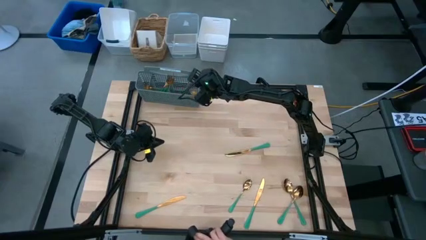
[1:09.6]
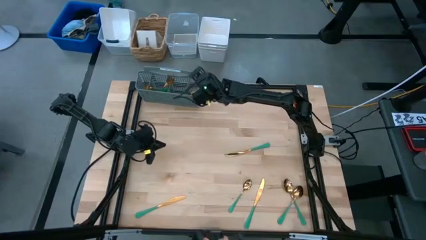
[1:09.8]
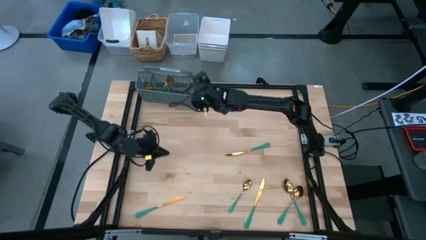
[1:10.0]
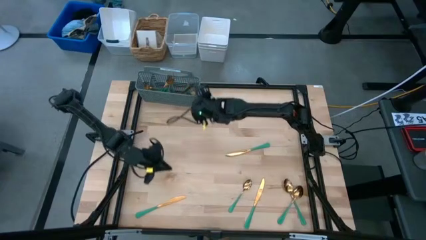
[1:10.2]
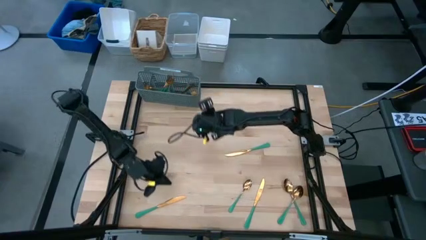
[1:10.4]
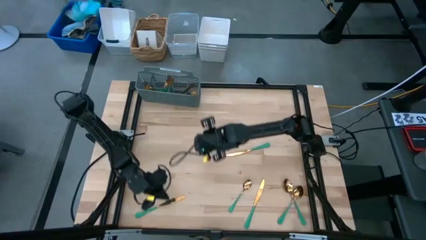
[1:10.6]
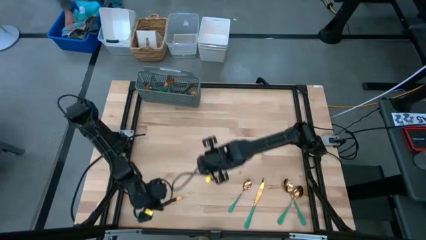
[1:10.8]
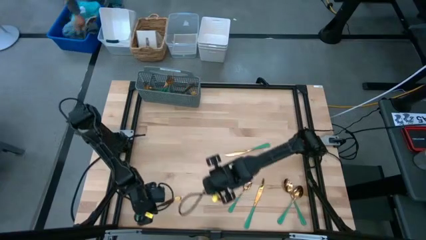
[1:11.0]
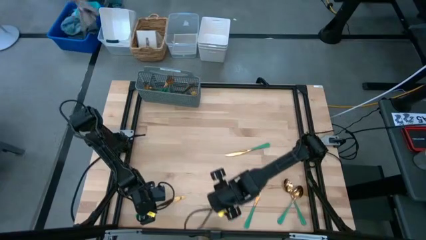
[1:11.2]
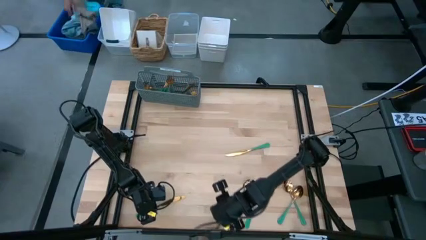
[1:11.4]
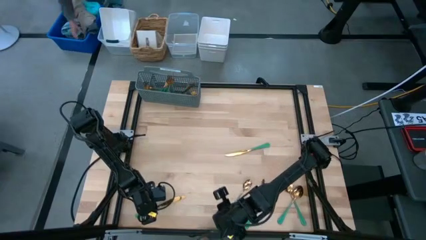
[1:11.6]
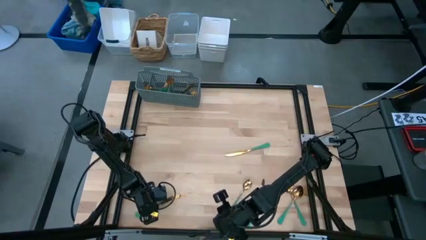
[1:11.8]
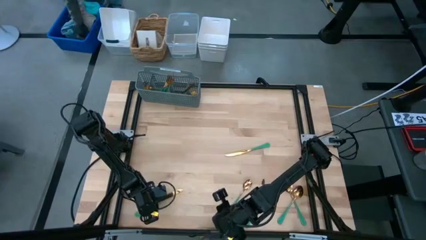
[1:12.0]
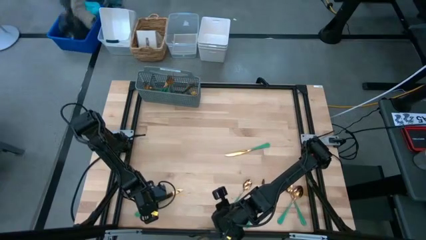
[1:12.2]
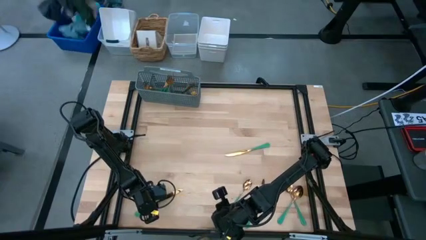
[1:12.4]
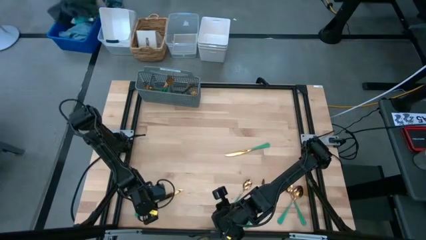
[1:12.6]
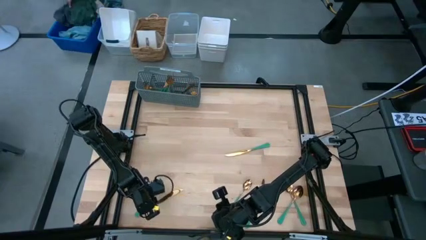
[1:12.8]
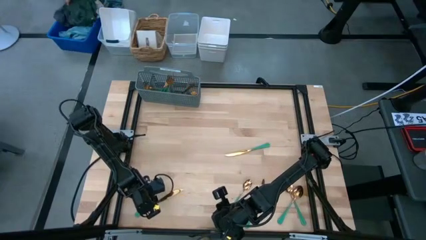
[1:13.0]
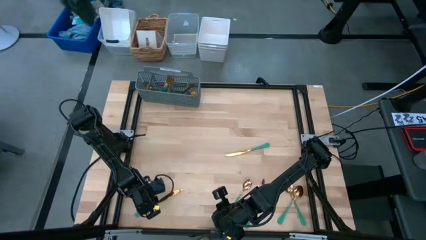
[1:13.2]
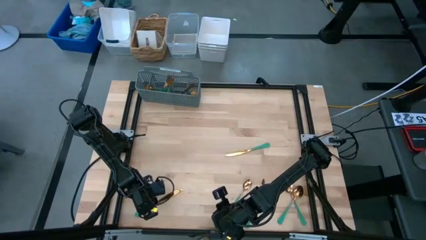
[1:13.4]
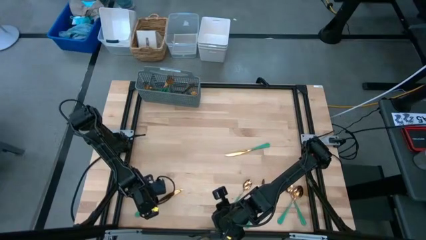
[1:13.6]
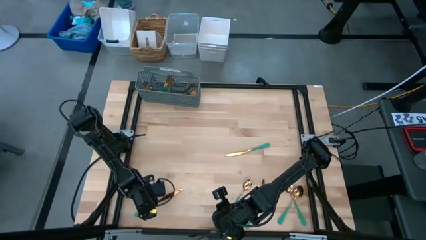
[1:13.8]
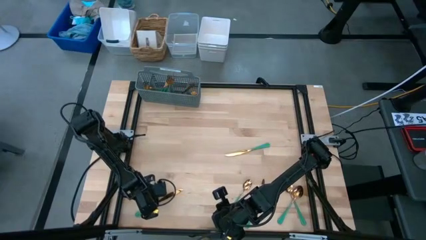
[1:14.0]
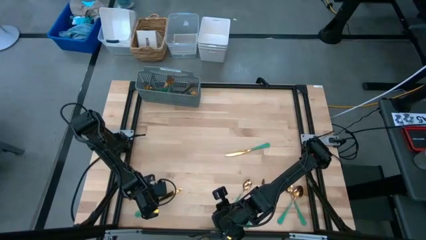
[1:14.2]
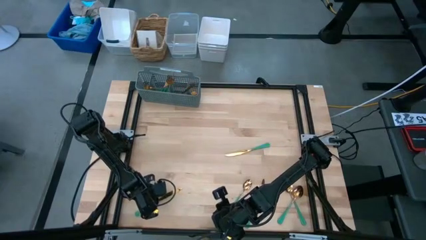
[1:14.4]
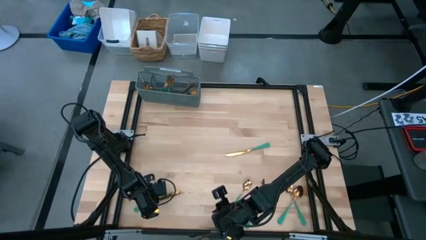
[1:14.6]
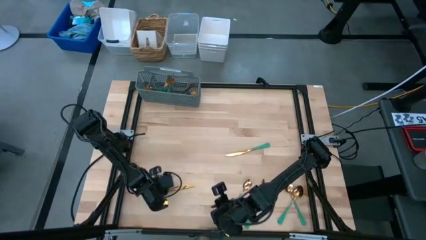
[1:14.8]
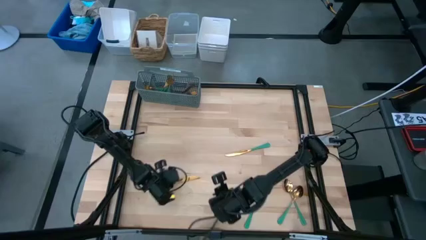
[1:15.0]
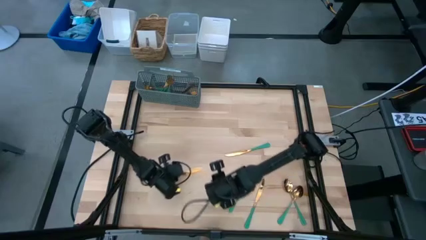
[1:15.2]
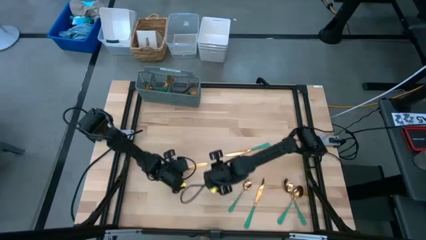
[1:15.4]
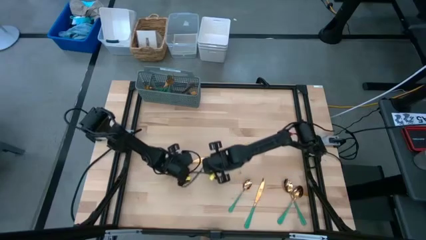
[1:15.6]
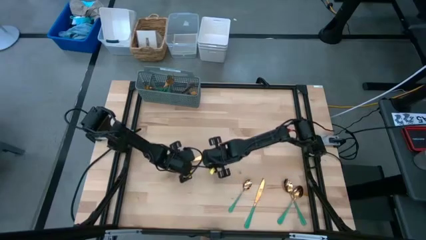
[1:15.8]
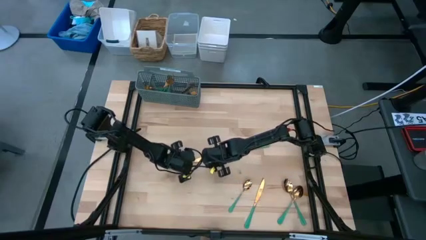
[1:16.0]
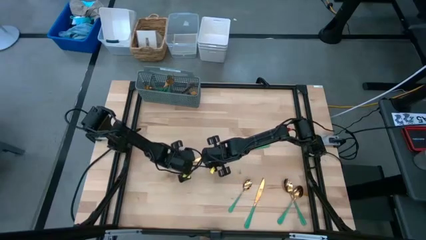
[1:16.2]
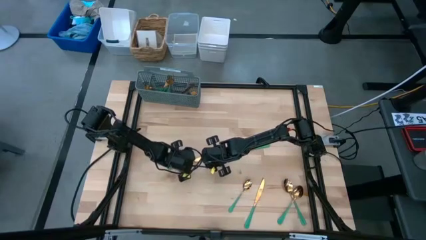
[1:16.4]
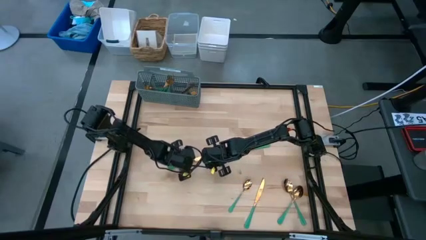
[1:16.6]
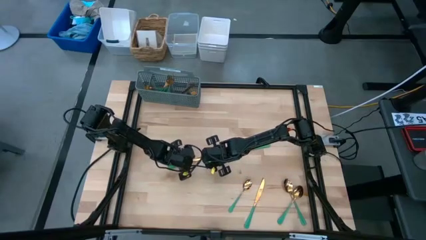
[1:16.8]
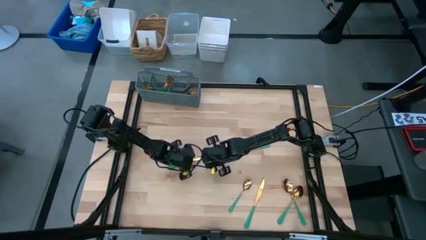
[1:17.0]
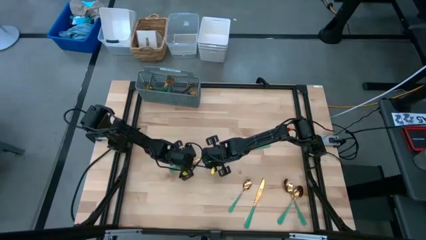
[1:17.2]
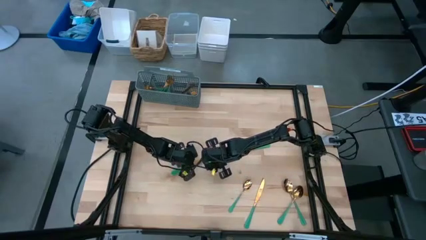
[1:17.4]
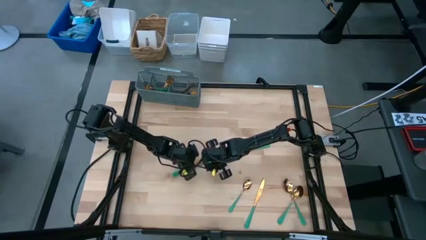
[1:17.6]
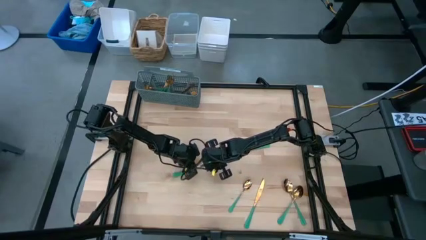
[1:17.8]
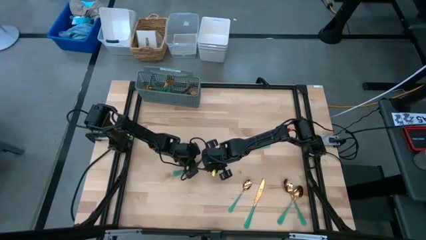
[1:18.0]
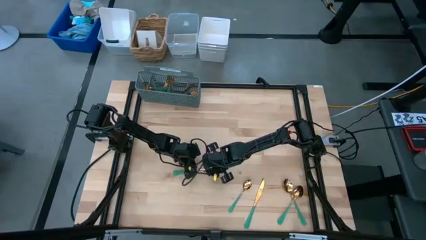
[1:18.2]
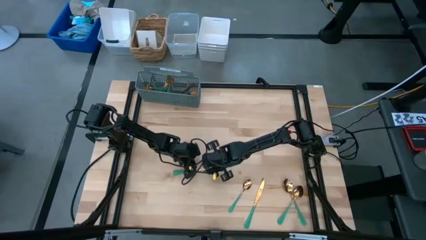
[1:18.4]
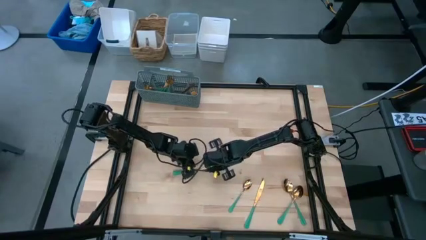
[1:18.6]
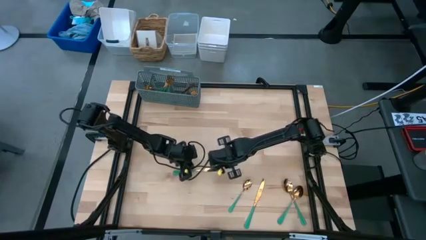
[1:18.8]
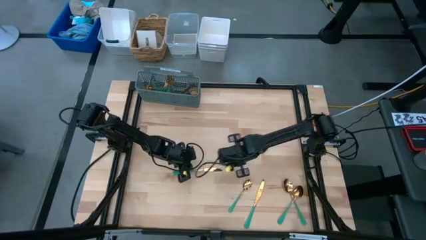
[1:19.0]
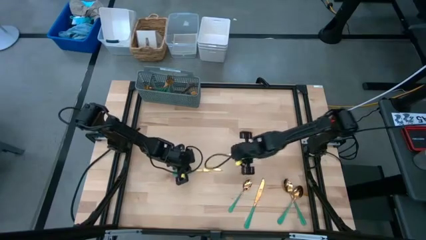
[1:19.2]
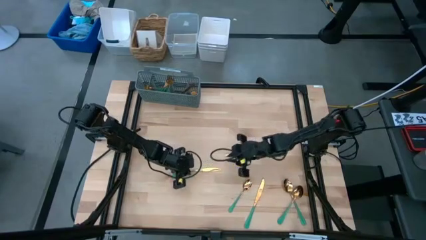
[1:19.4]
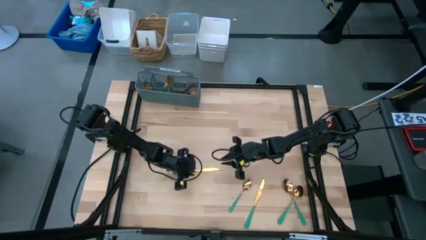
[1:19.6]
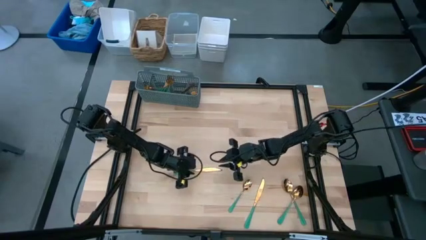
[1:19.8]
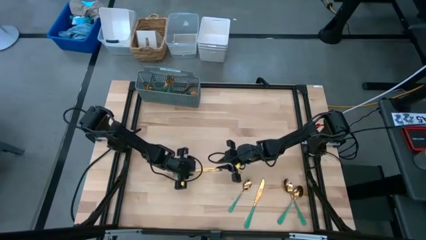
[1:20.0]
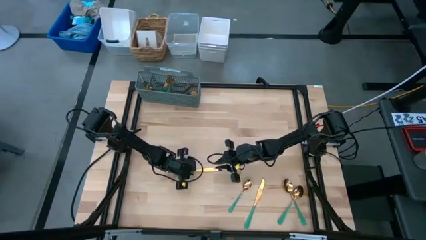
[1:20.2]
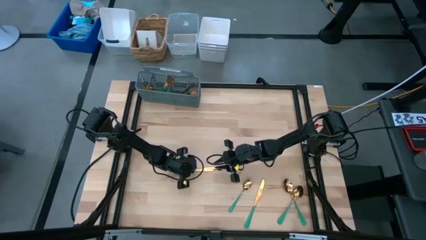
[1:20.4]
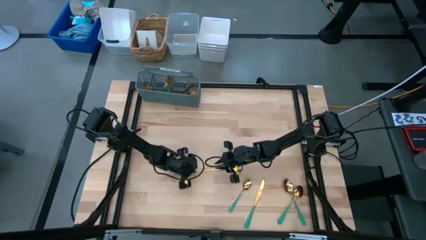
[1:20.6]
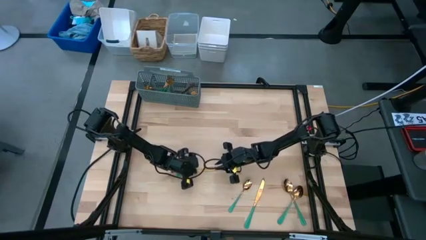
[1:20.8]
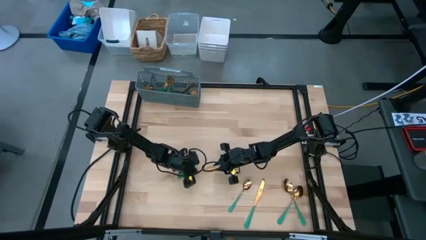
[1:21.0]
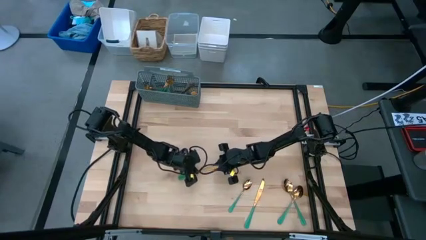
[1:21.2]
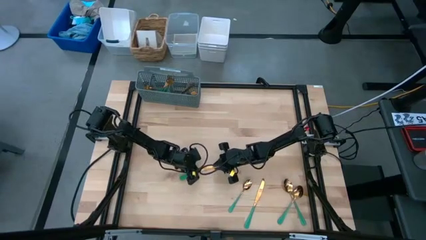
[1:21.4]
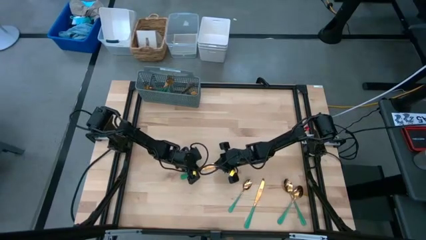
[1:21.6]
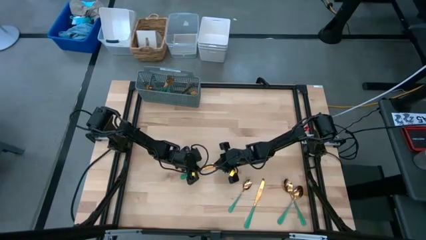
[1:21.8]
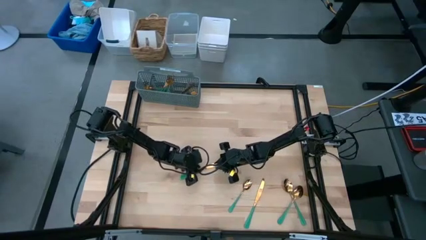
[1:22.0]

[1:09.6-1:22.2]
Task: Sort silverware
Put the green knife into the gray silverware basket

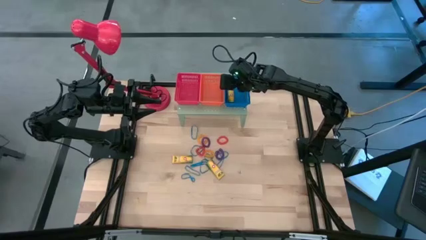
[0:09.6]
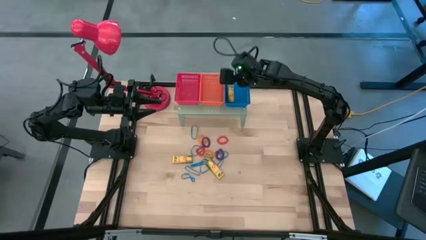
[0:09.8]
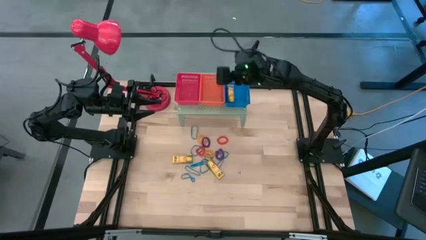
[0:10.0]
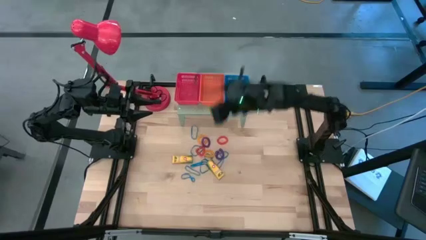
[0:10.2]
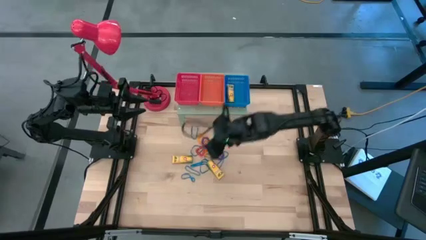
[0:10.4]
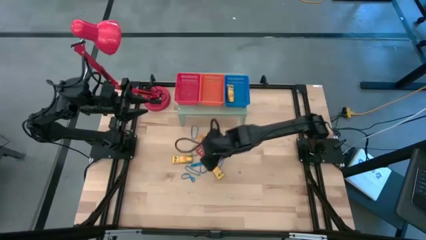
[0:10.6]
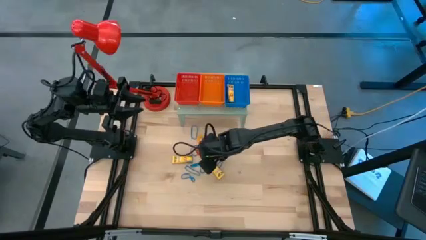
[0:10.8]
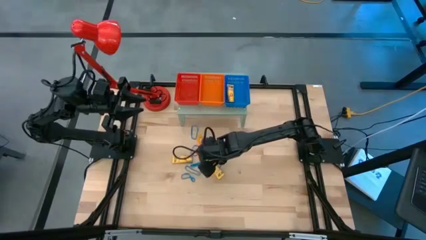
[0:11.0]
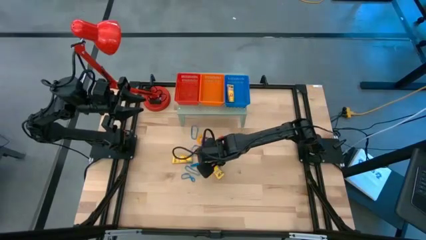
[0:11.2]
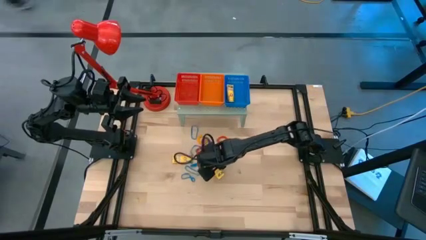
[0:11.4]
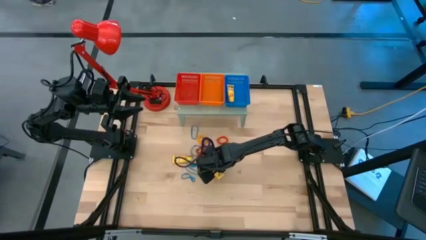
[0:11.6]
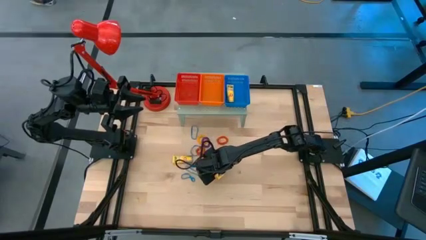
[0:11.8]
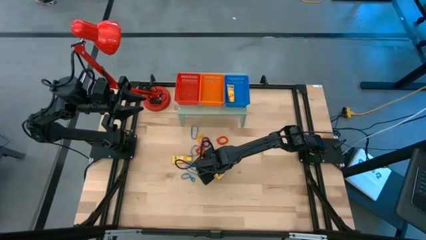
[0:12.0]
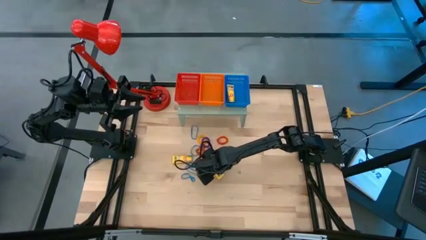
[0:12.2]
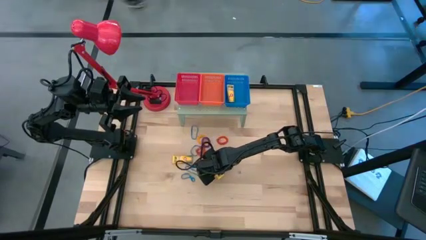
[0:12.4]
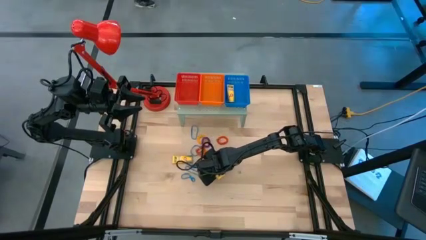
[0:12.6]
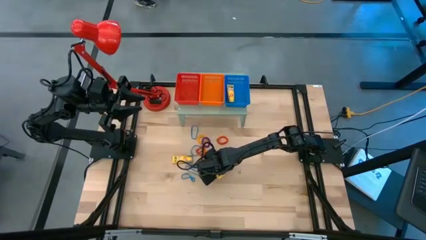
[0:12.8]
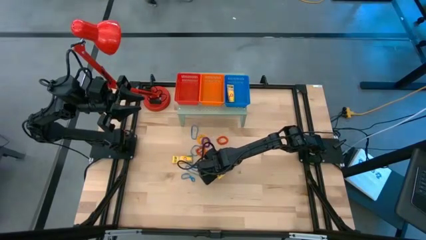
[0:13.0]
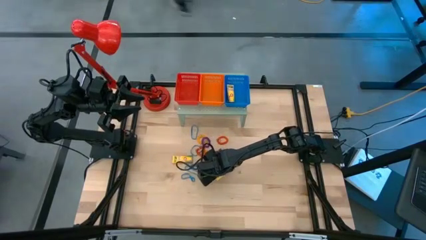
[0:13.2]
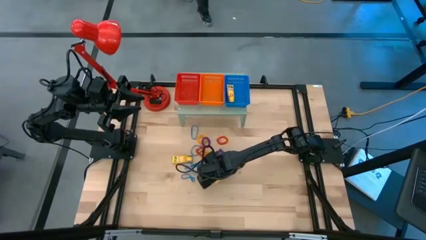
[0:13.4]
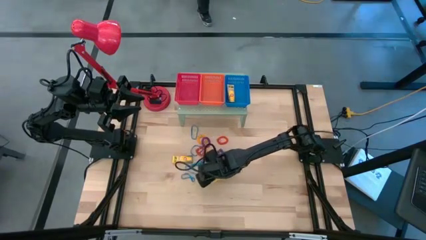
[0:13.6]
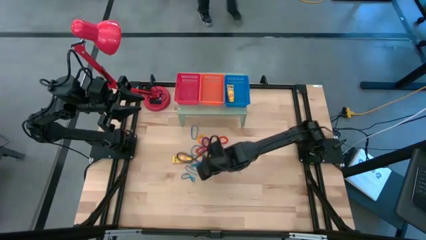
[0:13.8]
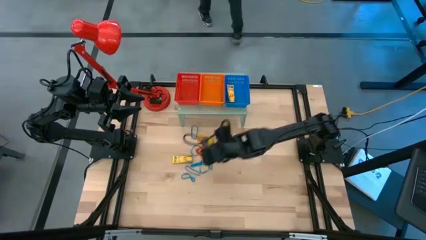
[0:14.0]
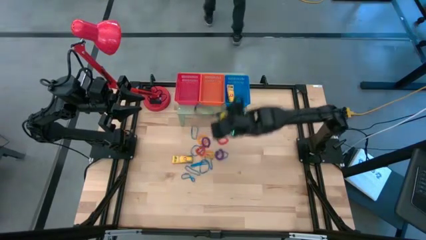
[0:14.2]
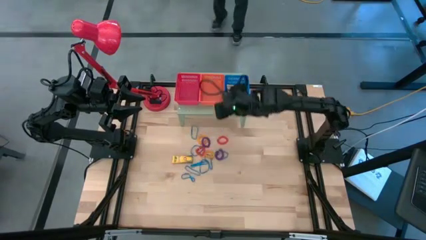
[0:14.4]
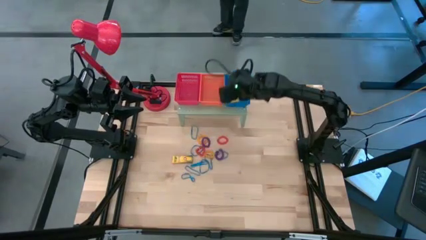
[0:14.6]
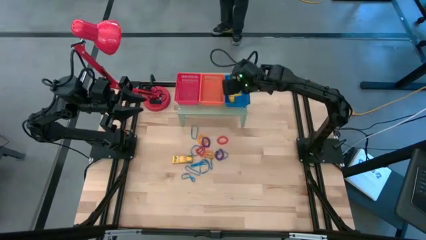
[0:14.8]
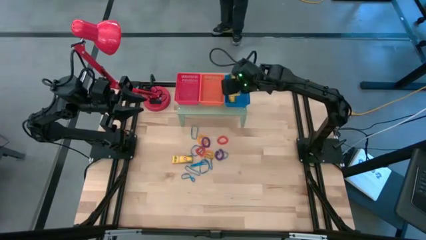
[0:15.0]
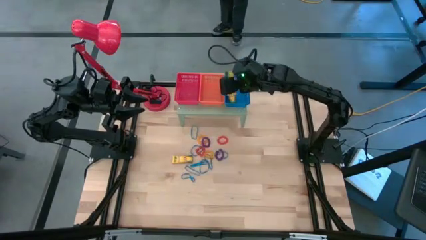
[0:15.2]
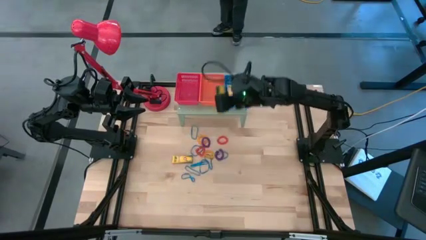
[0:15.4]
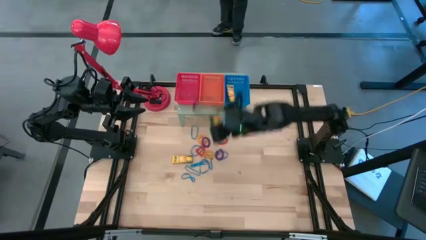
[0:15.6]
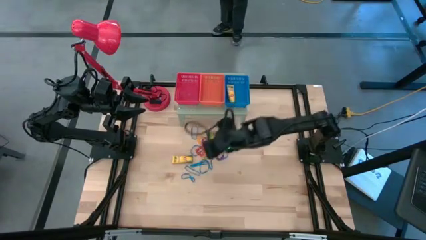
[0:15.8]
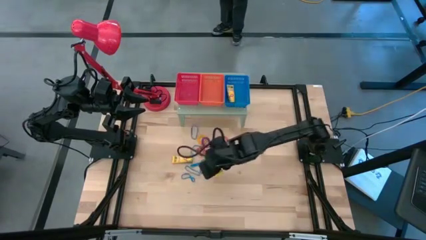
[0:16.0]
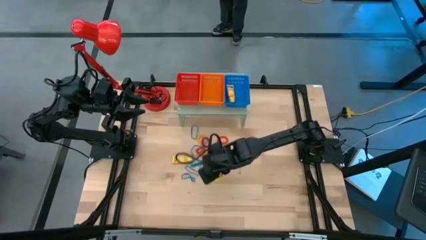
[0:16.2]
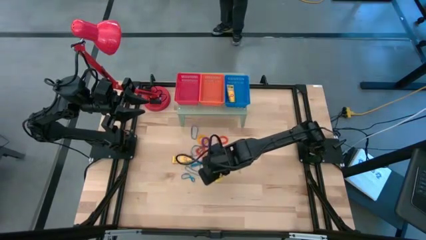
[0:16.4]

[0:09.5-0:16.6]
Task: Pick & Place Office Desk Supplies
Put the yellow crayon box into the blue bin on the shelf
